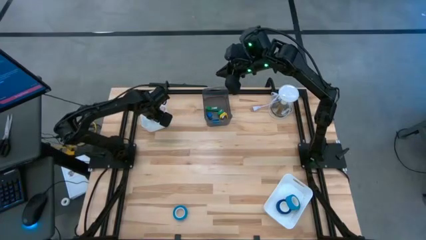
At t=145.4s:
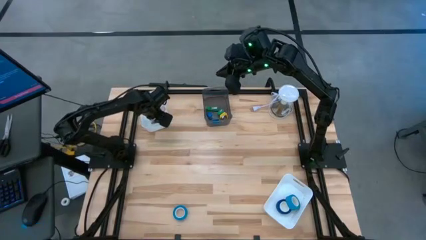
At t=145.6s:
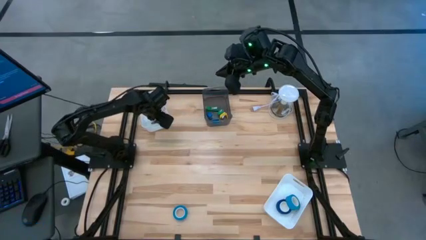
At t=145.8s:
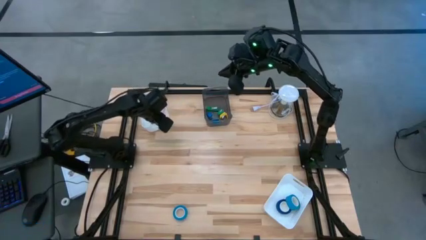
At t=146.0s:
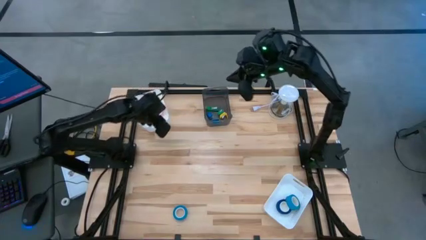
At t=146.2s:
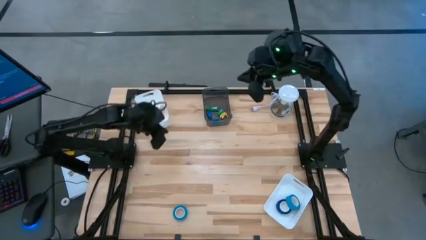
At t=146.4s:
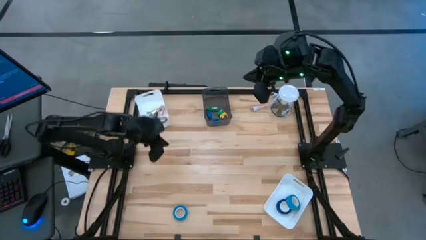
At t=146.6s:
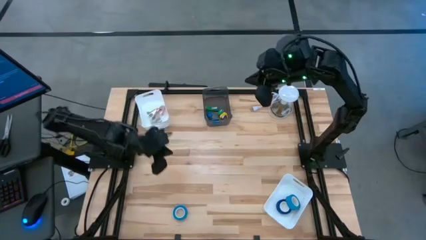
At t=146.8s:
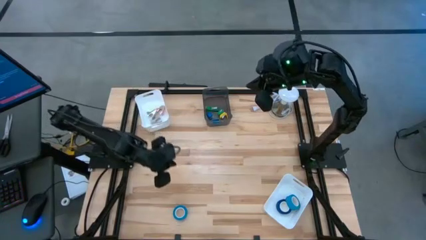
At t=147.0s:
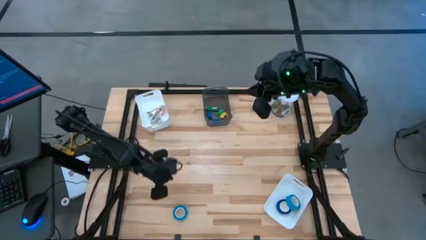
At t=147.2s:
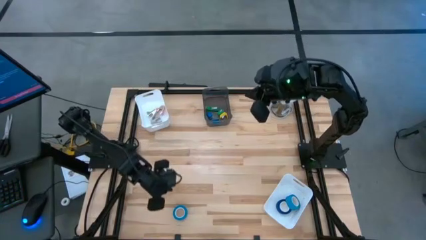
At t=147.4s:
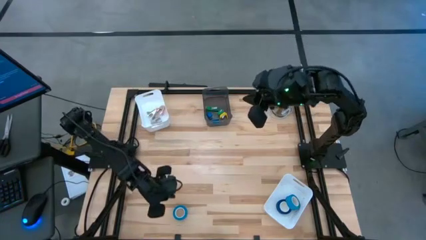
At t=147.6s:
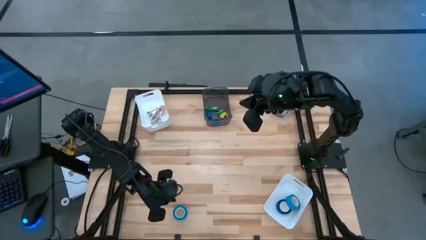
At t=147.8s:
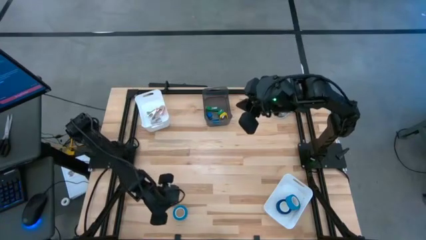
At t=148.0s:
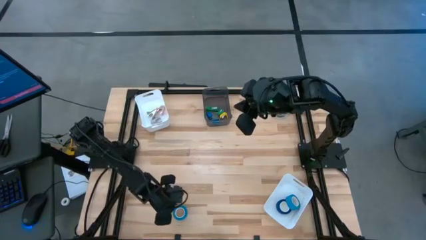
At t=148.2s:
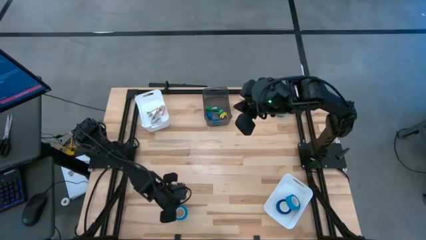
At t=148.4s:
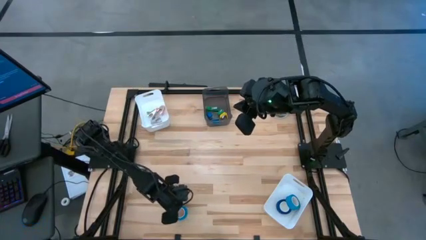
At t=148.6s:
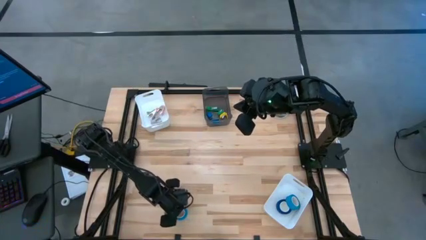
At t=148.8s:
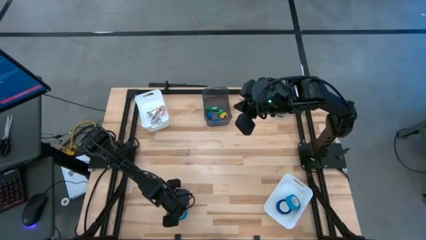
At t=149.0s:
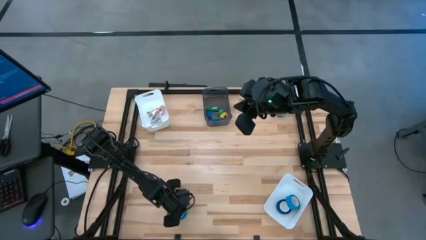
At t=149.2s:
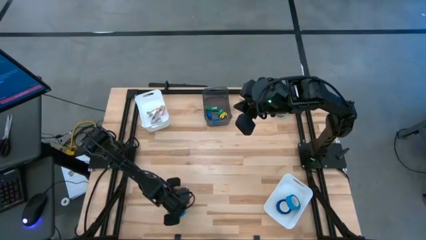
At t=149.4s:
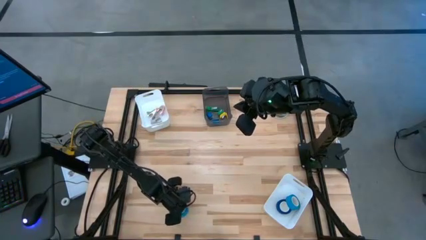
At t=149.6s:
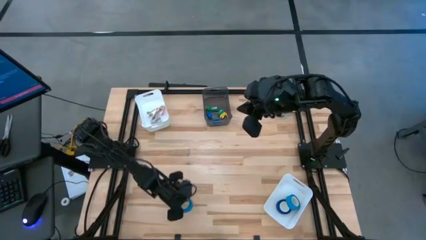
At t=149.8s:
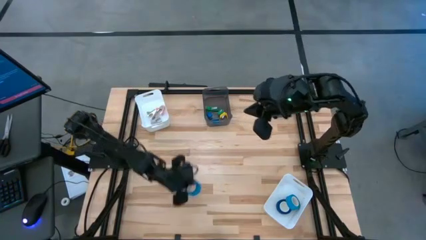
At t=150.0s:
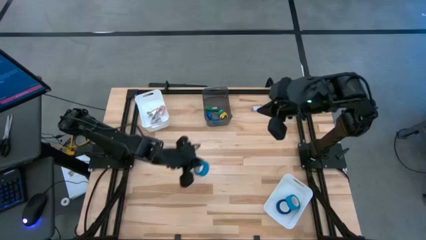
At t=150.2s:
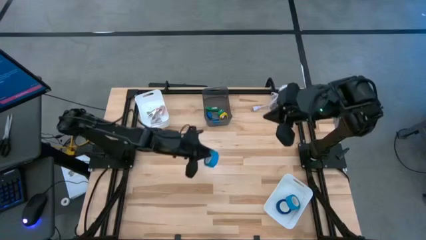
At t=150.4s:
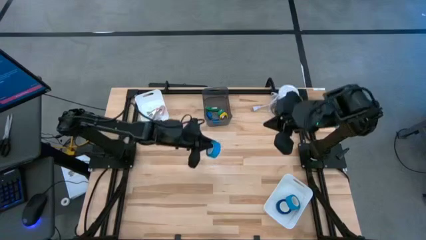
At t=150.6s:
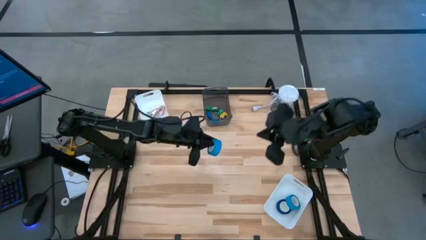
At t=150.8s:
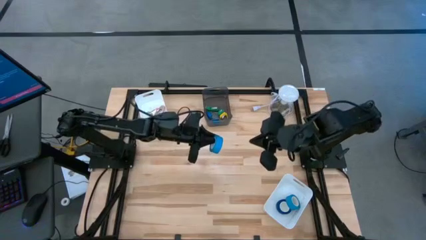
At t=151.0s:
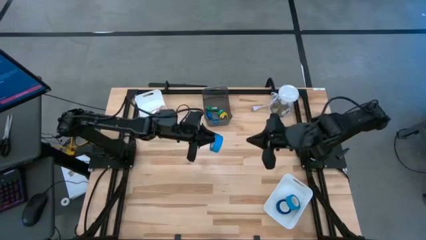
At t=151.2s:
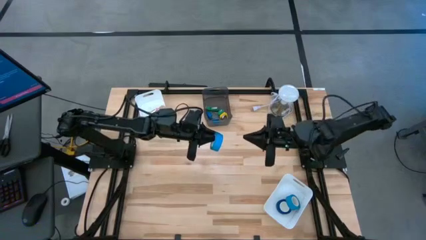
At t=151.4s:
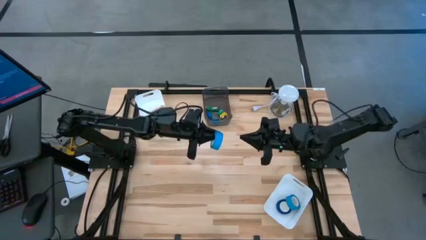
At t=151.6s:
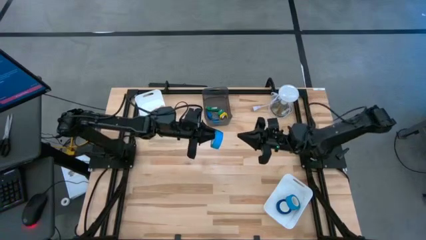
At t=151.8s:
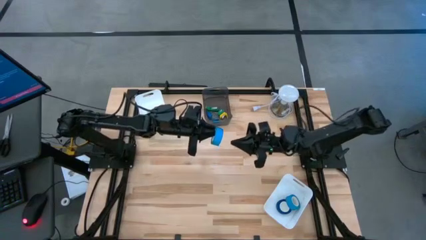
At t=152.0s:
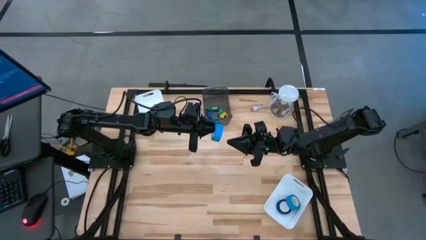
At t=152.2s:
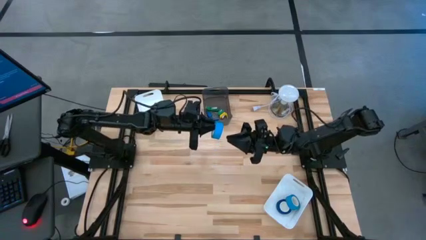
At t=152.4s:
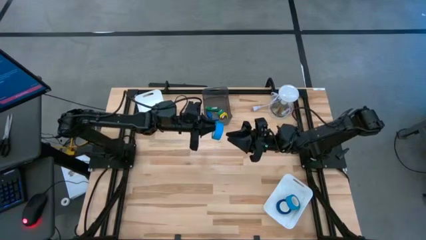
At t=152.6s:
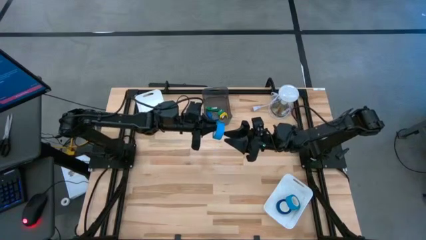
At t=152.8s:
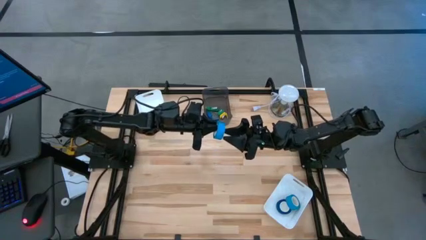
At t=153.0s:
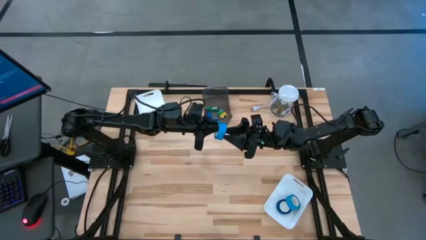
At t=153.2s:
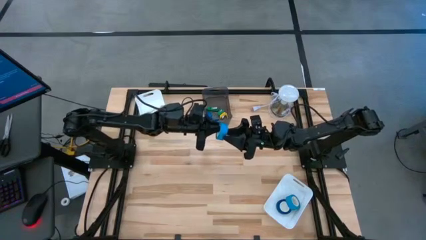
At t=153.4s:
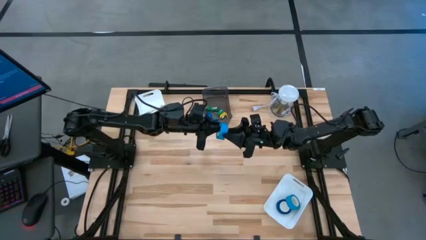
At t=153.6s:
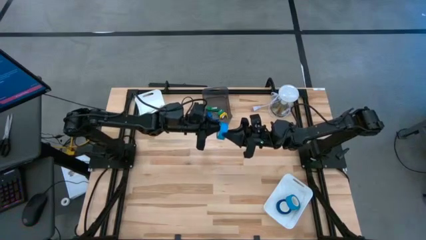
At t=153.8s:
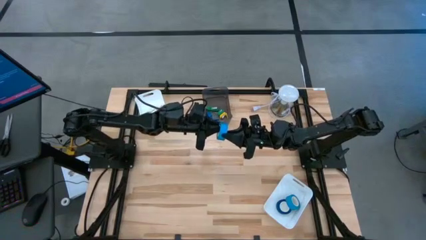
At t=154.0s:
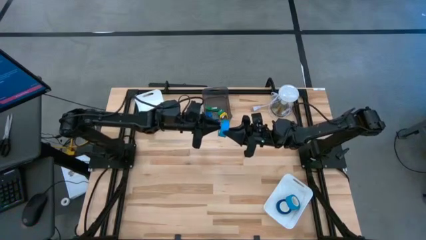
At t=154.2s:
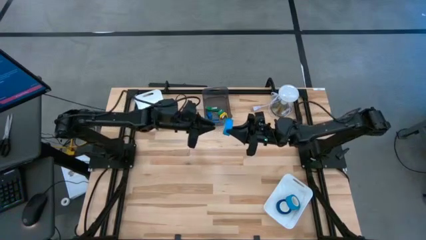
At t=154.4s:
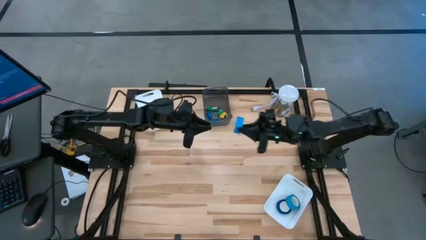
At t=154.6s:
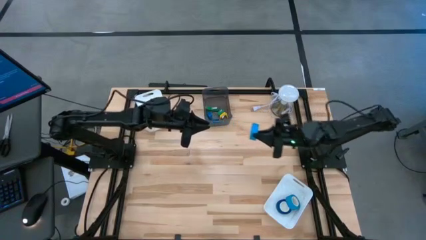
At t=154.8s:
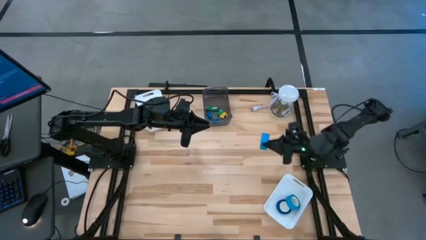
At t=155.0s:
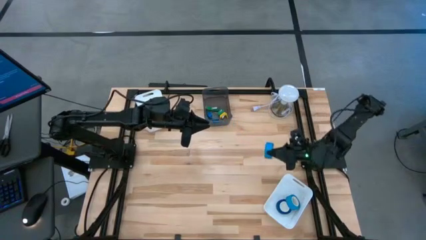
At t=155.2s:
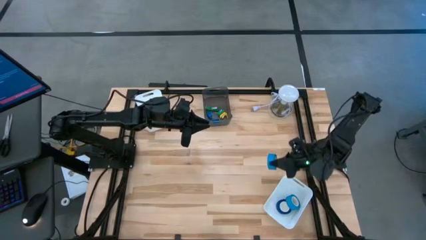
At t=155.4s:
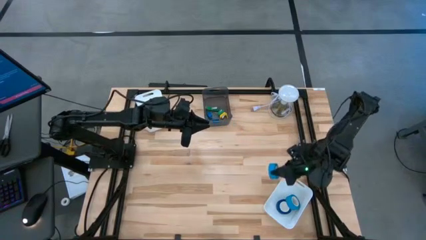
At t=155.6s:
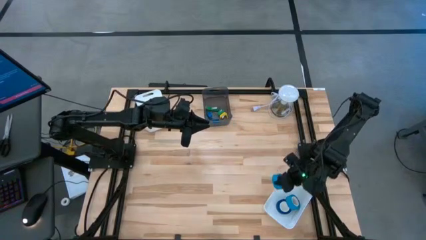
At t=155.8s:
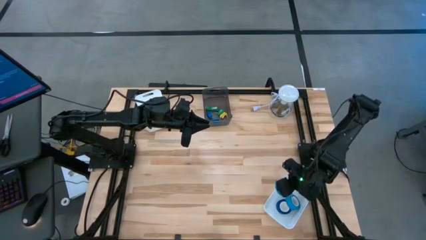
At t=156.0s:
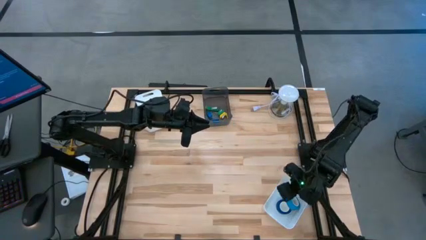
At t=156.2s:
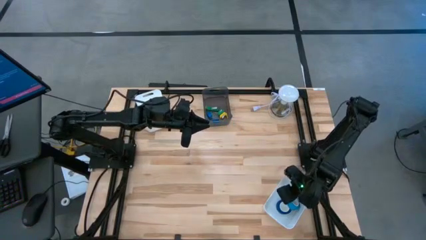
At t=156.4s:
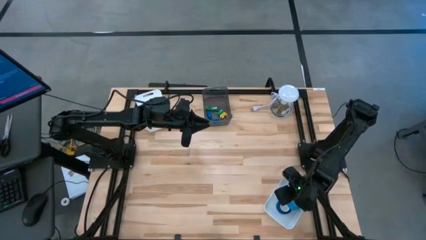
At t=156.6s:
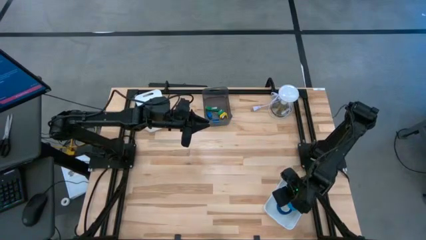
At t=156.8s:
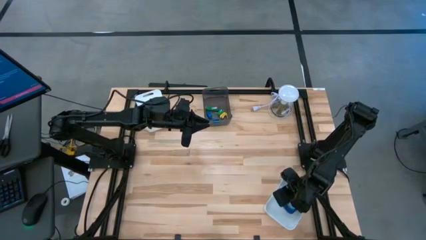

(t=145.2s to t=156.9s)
Task: Pick and place Stapler, Stapler remover, tape
Put the light blue tape into the bottom white bin

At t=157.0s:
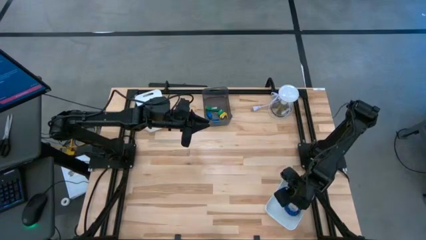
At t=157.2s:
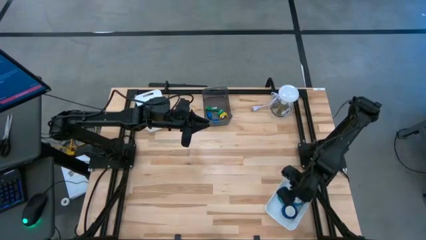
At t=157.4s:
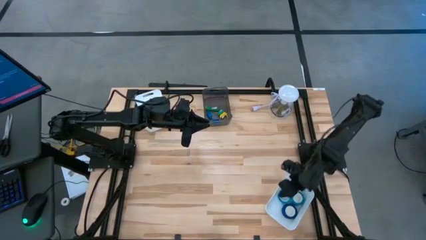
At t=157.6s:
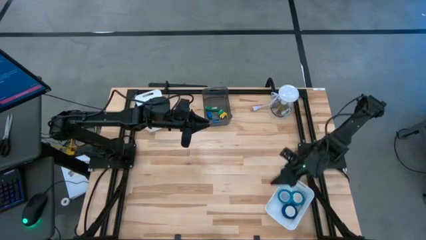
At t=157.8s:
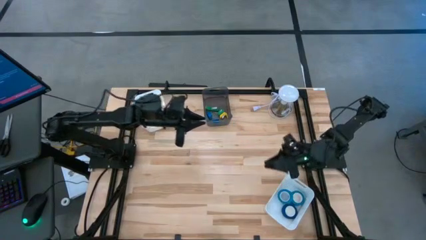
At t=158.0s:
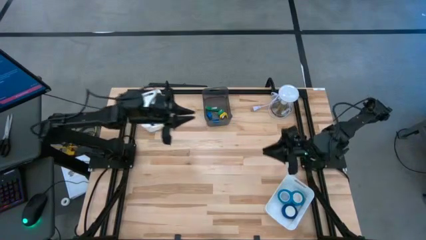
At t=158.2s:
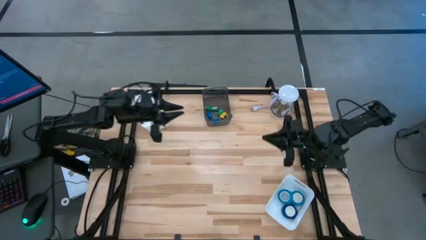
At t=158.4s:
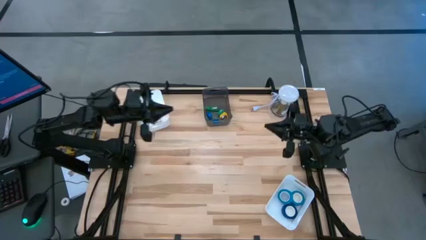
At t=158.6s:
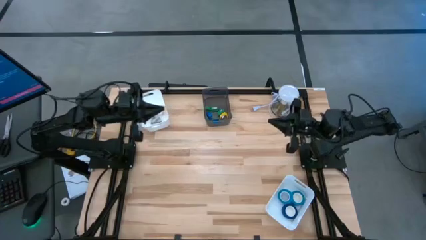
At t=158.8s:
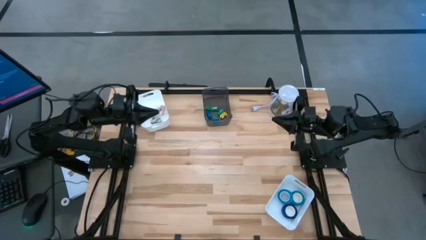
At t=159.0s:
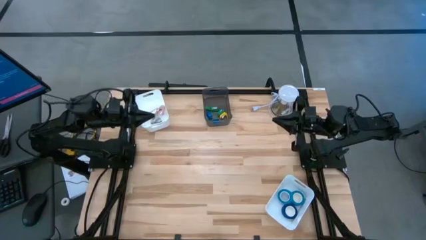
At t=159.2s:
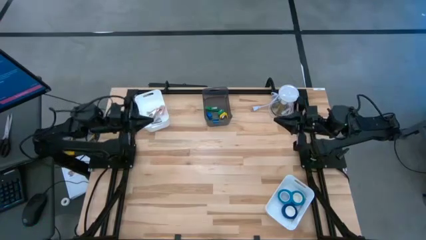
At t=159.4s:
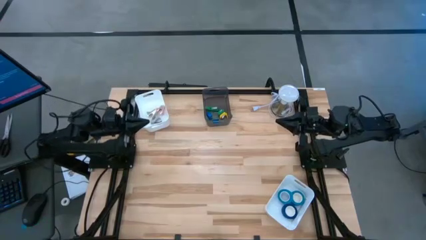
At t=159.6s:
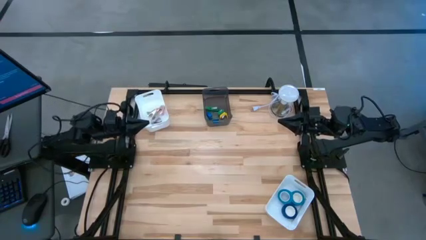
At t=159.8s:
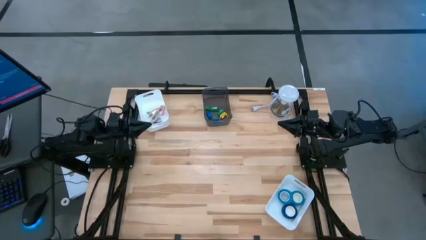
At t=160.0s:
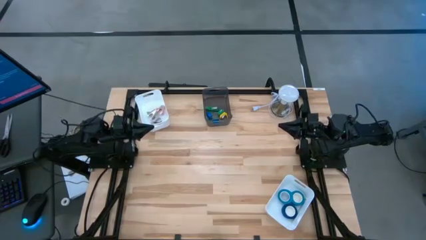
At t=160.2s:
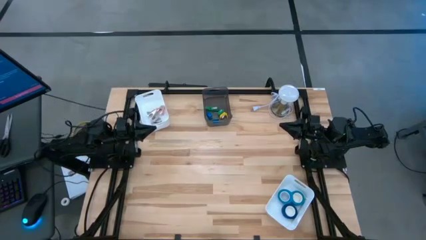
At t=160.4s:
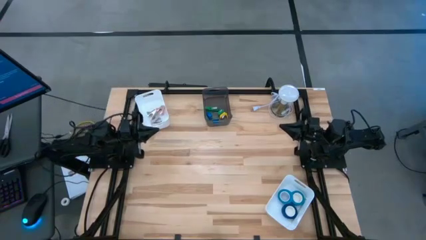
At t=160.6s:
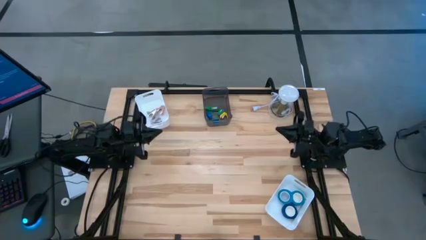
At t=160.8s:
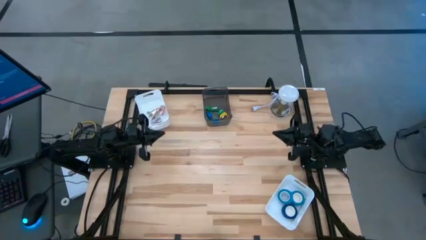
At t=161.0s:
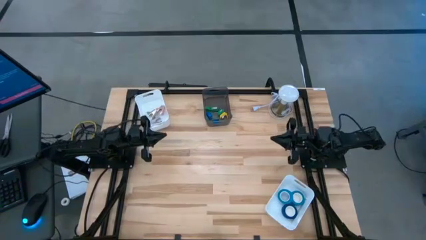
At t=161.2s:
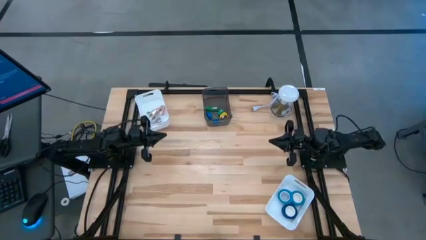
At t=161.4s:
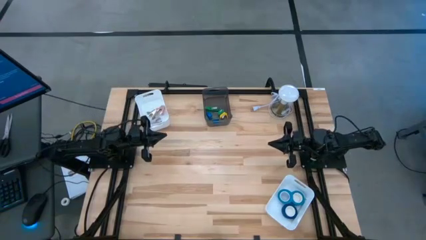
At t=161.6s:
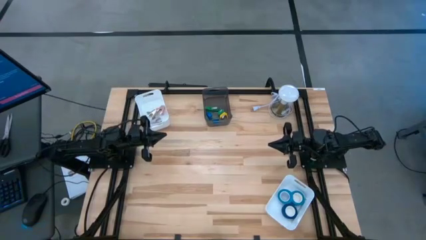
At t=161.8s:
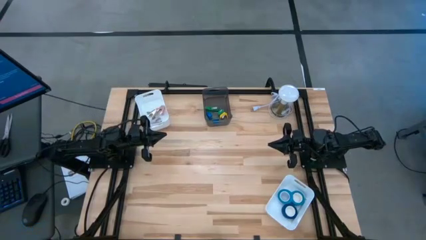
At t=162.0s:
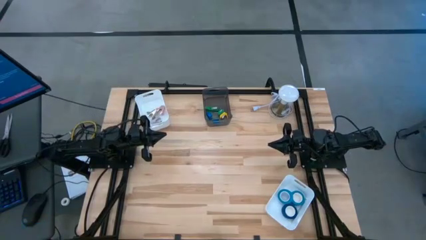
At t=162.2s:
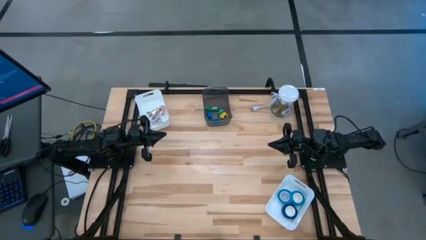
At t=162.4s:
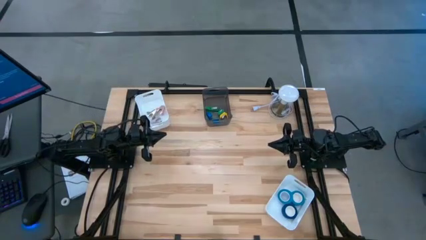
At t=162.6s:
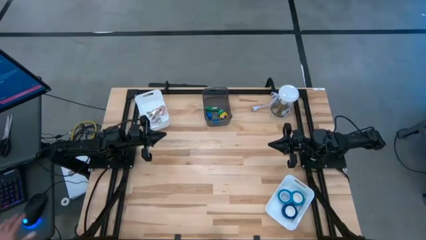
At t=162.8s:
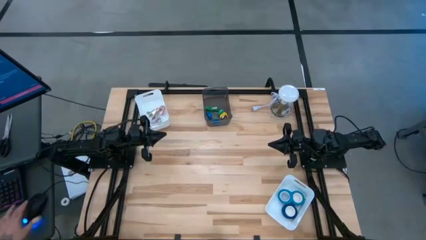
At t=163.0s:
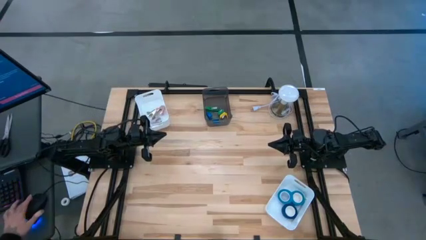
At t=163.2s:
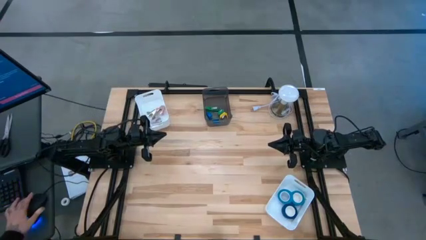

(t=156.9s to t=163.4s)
Return to Home Position
